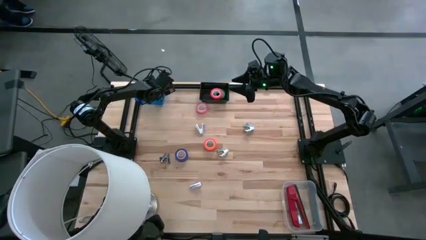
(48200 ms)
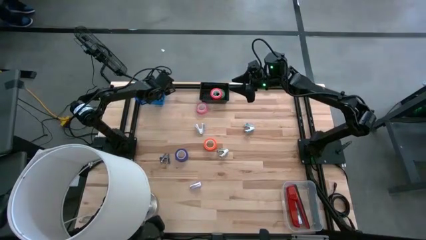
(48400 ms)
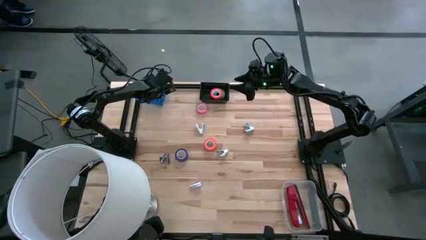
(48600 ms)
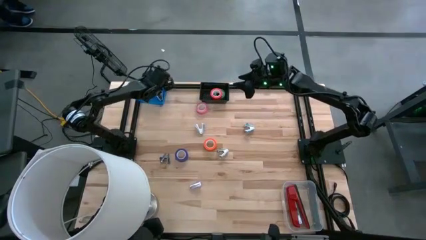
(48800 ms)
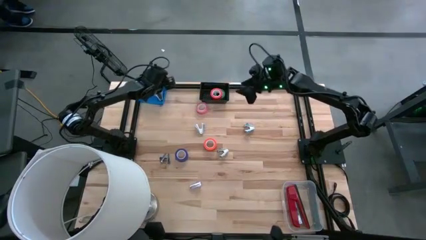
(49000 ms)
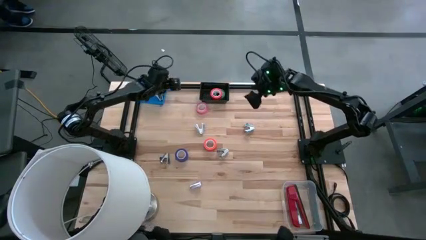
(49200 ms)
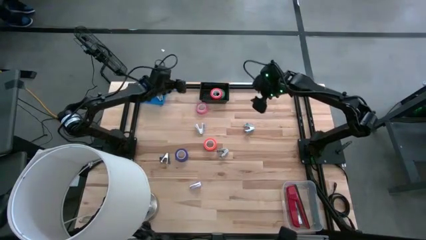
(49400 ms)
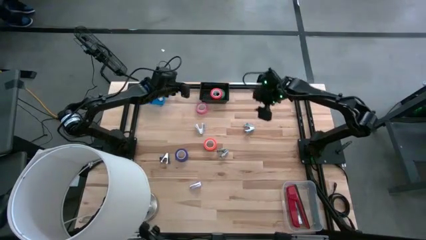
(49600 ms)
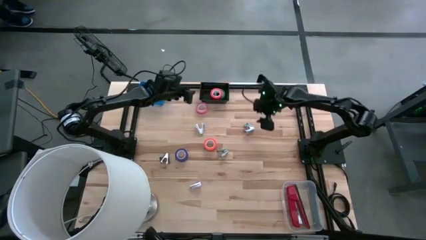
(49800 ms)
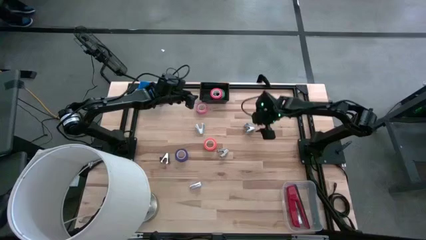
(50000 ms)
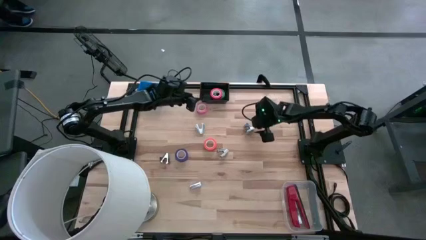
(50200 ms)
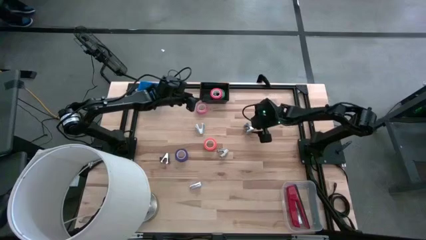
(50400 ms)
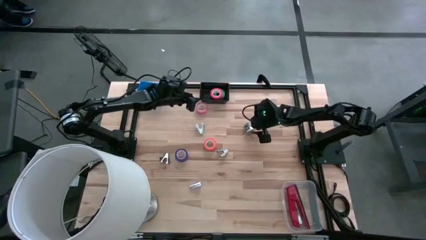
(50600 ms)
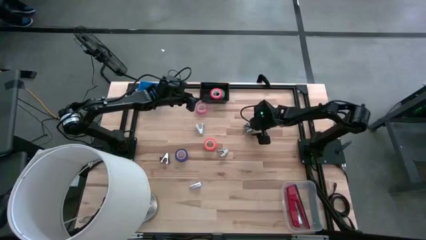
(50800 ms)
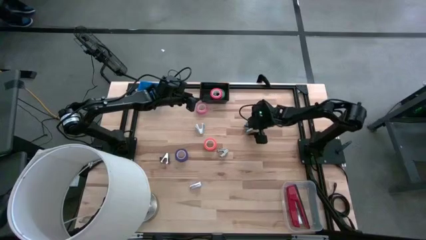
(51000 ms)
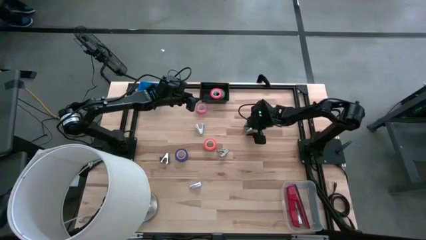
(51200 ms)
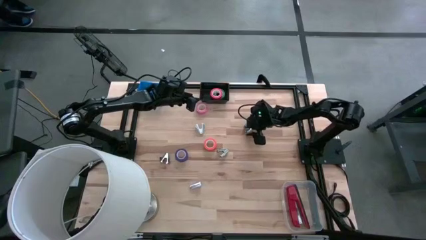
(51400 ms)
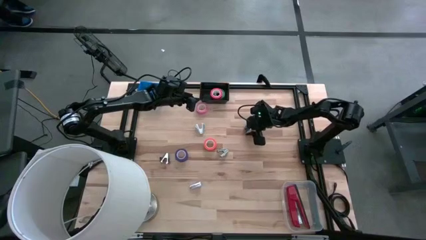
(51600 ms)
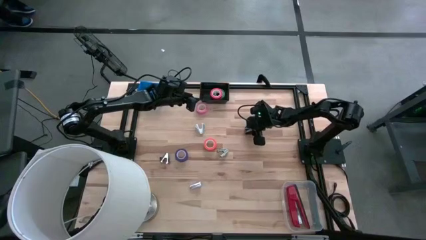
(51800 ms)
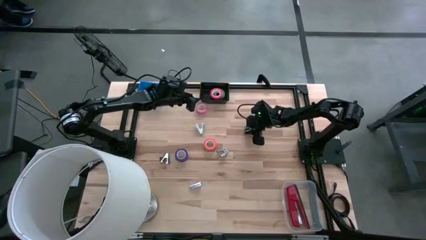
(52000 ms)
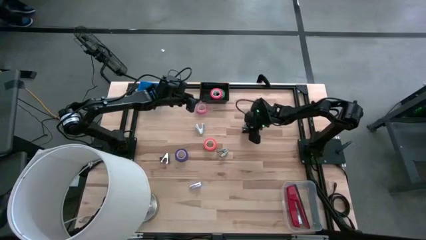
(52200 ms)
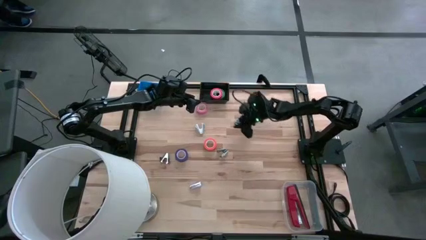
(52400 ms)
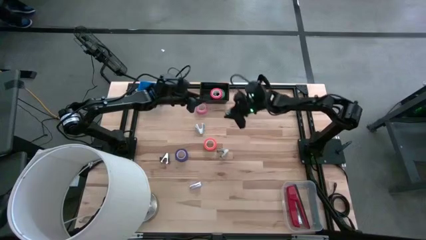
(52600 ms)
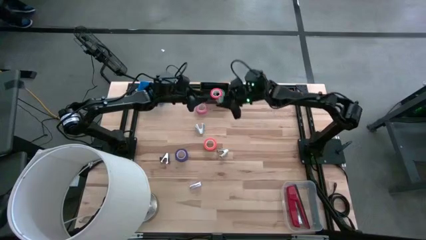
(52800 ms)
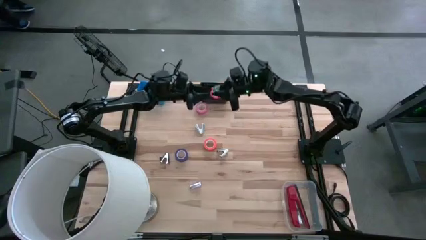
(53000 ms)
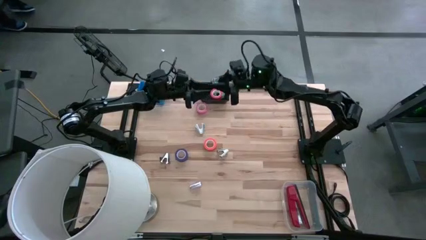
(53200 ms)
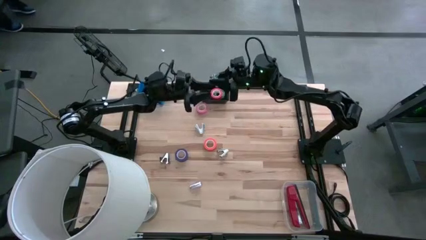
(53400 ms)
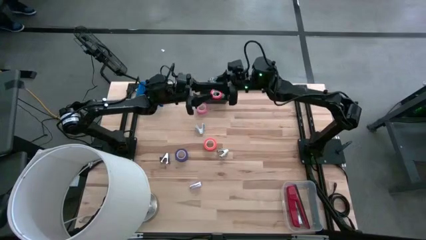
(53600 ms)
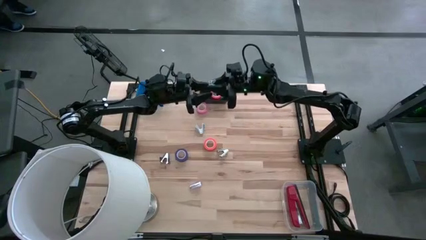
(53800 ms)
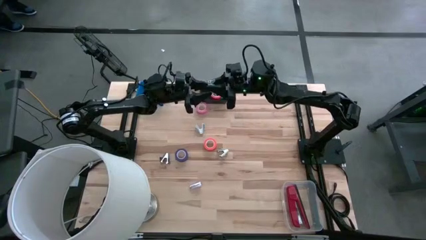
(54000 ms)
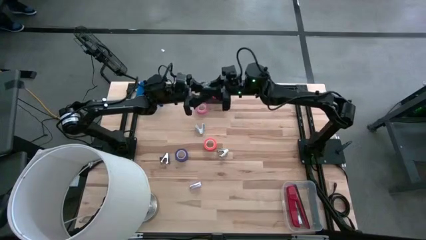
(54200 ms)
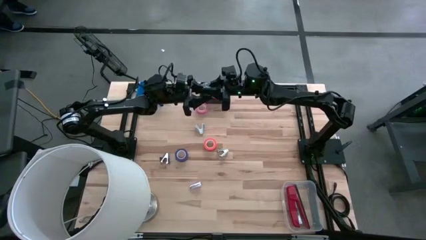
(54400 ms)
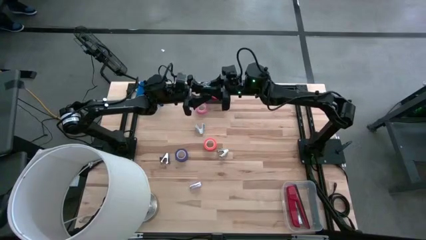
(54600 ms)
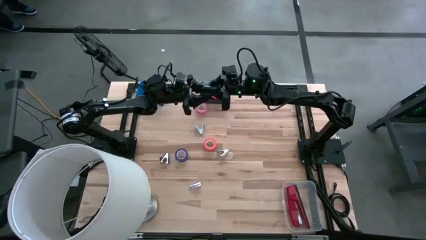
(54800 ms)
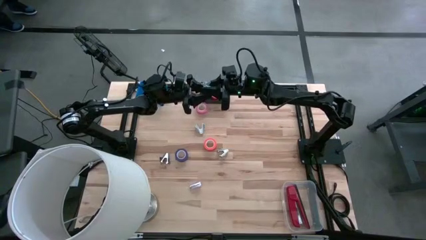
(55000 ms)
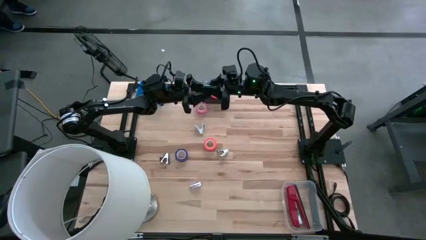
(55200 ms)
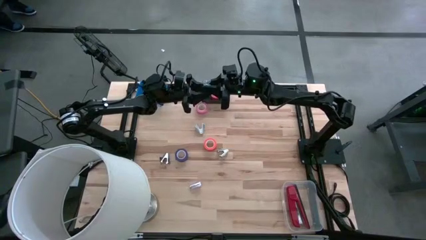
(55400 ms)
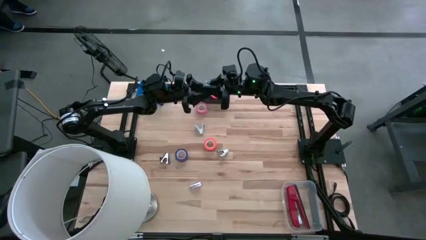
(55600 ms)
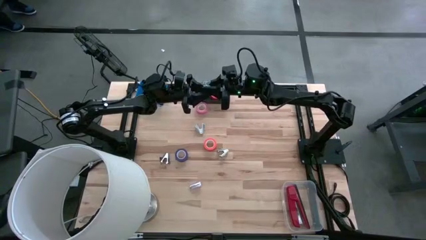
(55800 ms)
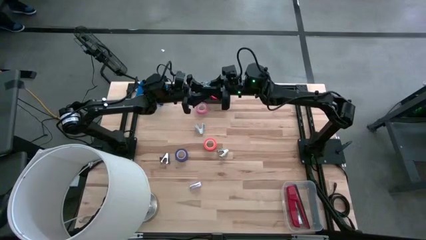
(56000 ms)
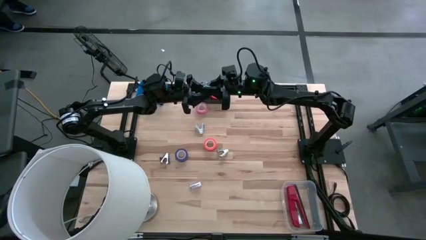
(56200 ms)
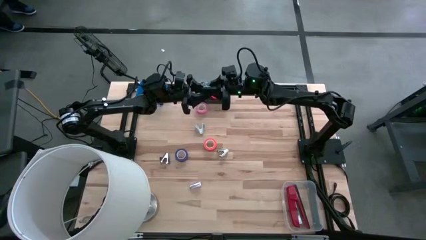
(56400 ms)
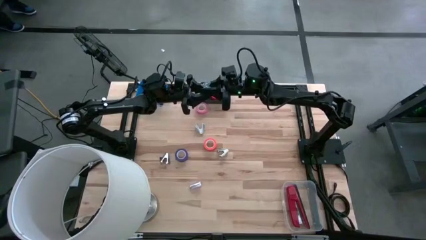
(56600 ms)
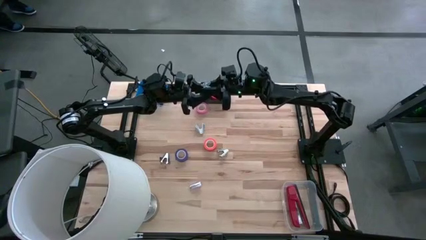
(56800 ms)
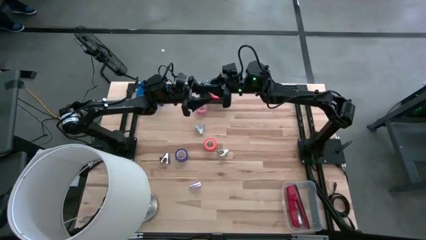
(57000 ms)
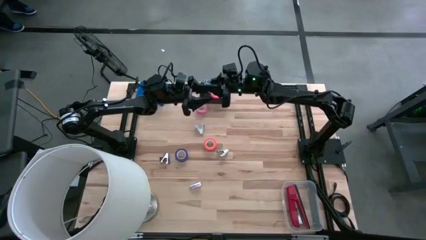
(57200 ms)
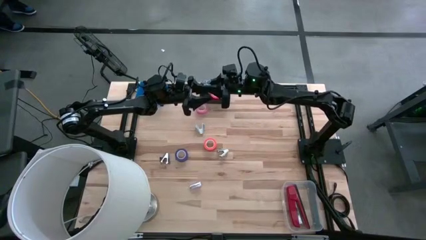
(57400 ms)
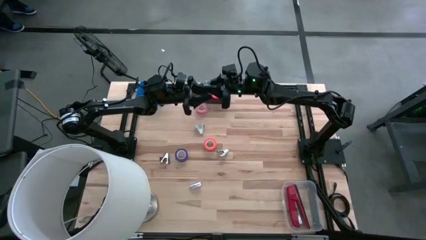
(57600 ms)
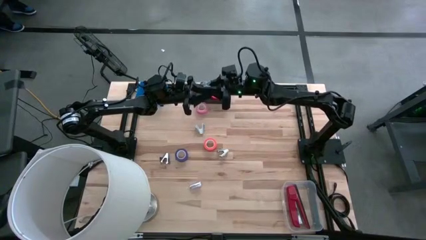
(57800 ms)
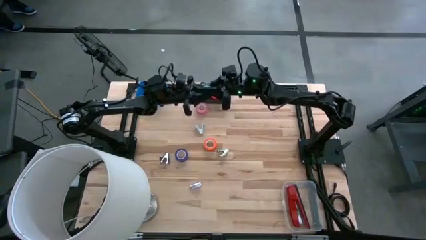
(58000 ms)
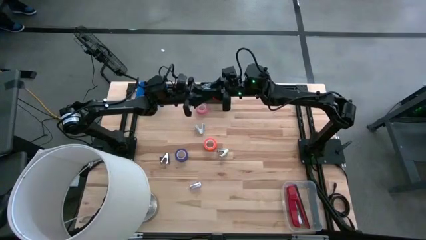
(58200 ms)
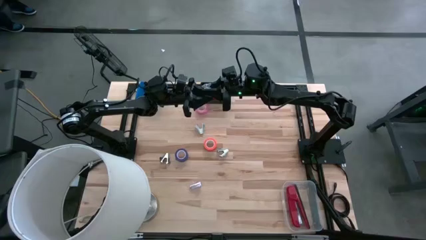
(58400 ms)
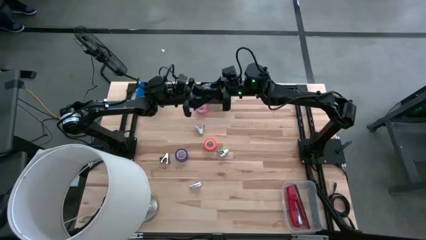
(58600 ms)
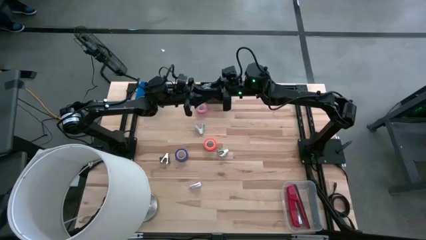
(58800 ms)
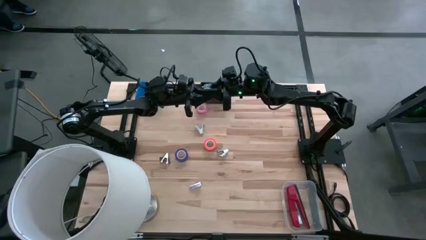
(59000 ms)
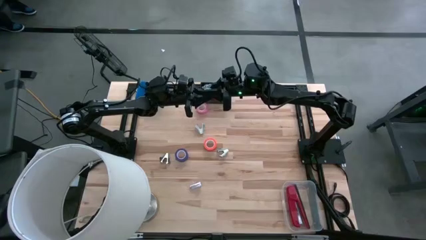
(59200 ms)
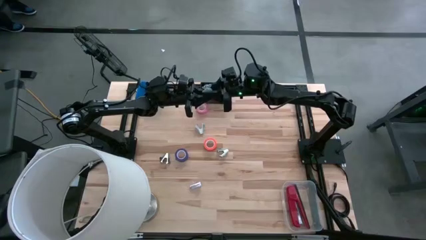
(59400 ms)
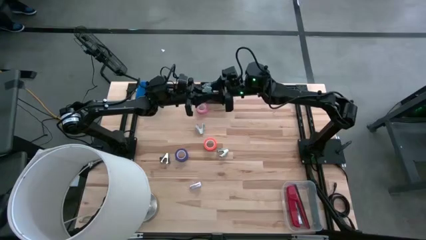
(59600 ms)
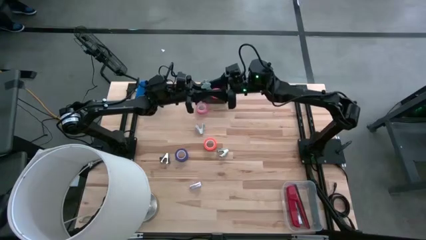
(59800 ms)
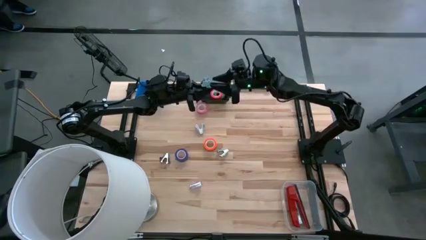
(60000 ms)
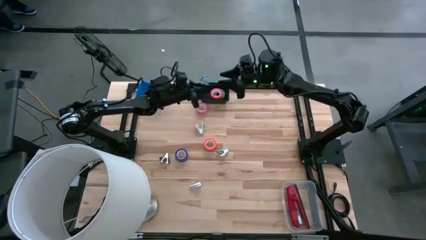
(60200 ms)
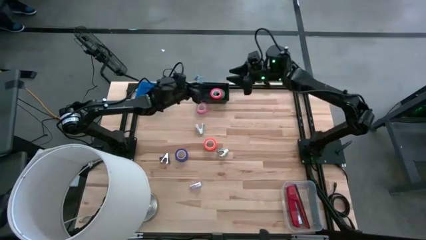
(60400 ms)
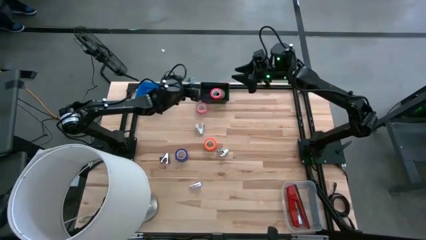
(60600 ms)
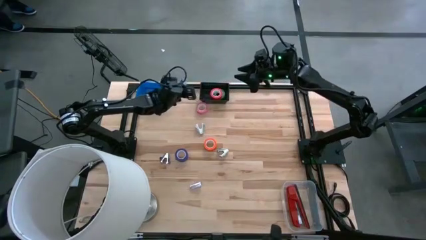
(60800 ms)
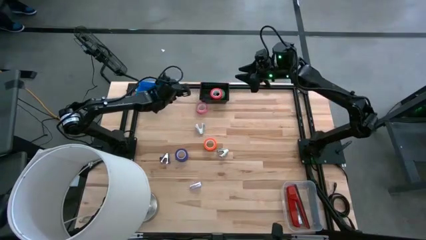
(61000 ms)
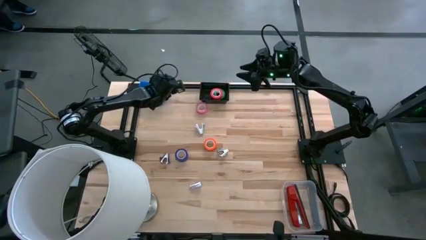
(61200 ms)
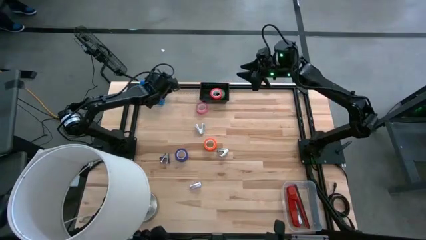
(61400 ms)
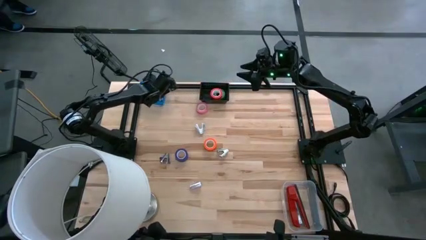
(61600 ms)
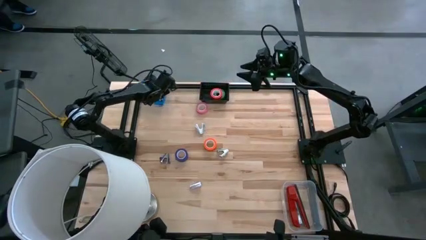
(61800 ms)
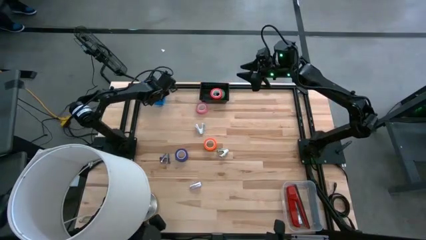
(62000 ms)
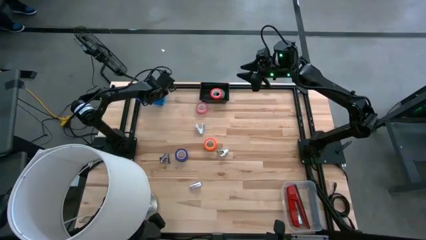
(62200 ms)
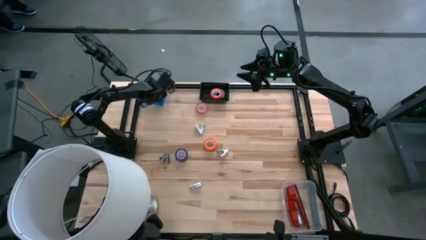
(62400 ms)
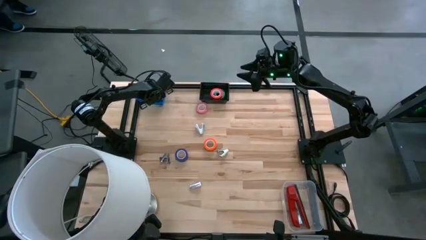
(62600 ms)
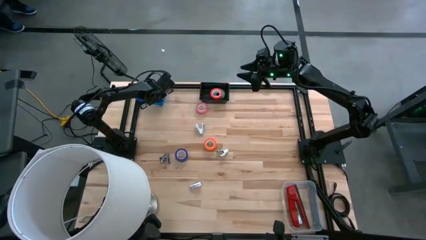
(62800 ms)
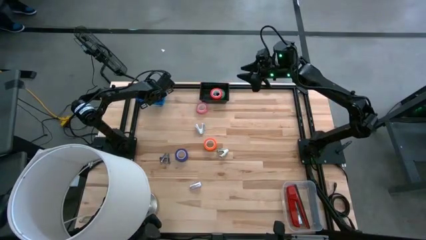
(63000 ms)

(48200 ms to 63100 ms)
Task: Pick and place Stapler, Stapler remover, tape
Put the right light blue staple remover into the blue bin
